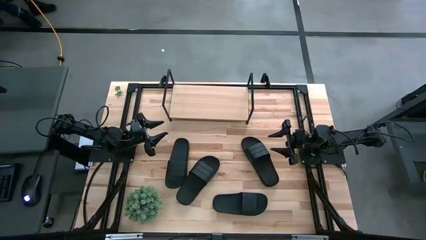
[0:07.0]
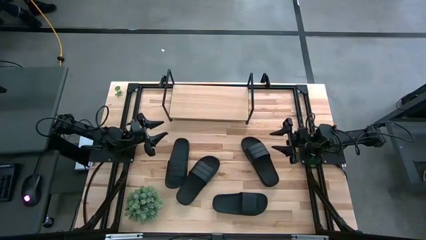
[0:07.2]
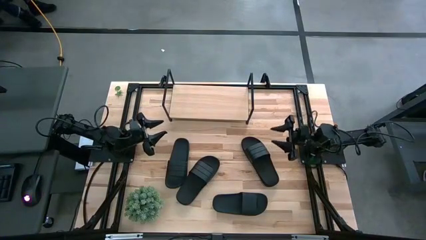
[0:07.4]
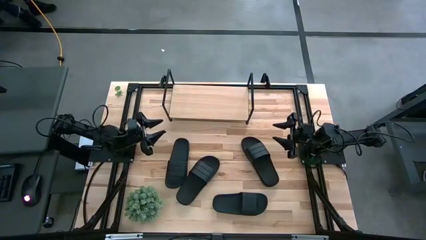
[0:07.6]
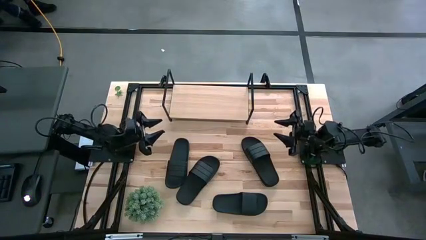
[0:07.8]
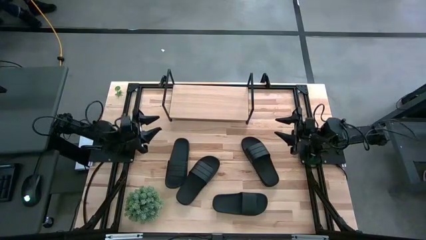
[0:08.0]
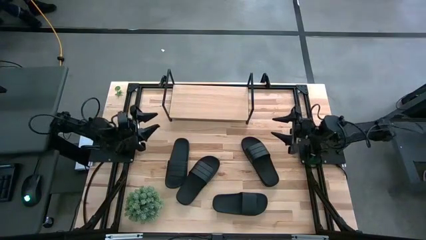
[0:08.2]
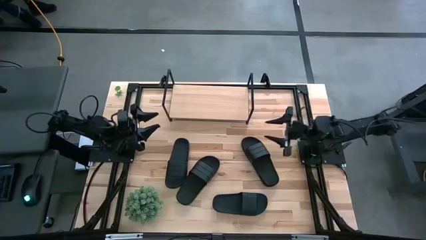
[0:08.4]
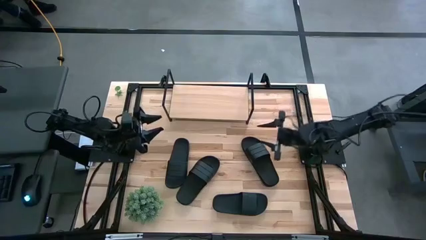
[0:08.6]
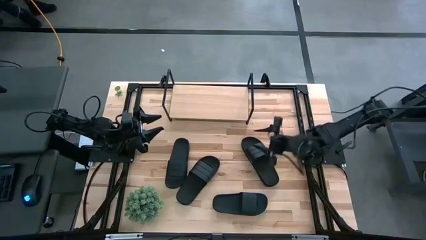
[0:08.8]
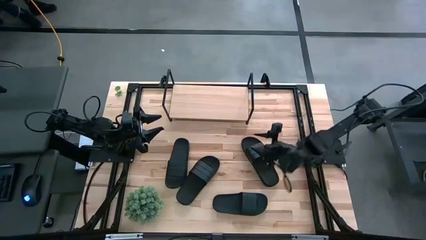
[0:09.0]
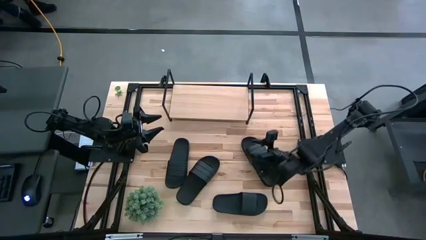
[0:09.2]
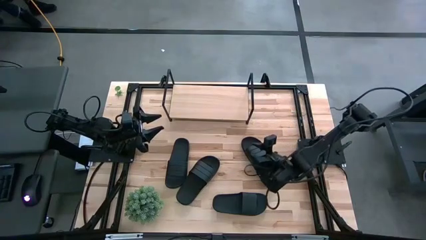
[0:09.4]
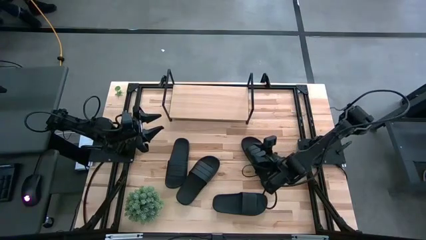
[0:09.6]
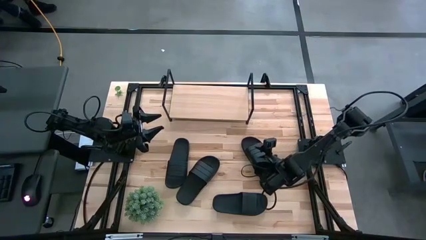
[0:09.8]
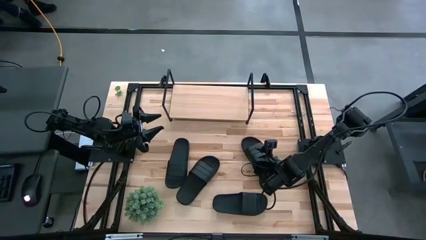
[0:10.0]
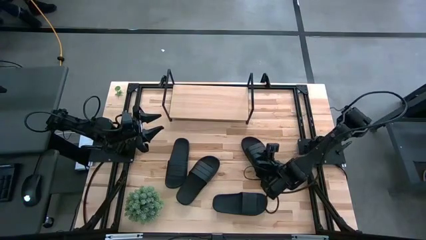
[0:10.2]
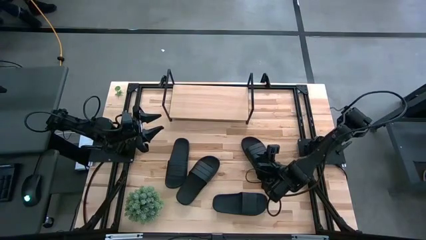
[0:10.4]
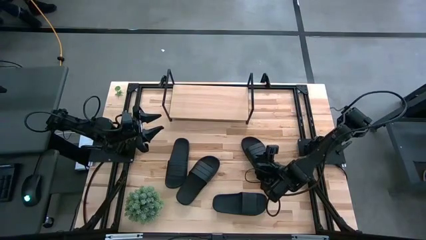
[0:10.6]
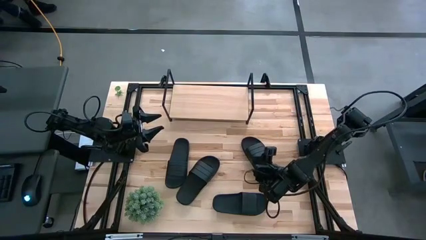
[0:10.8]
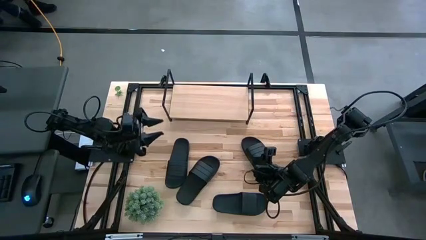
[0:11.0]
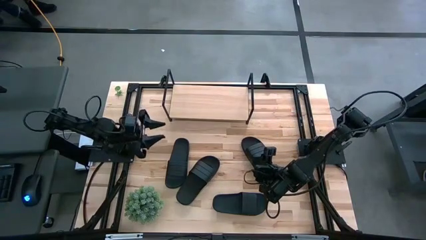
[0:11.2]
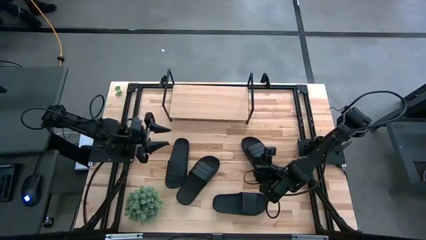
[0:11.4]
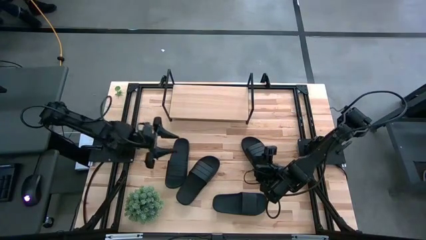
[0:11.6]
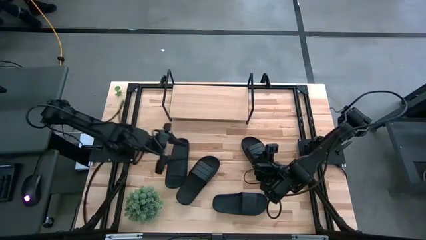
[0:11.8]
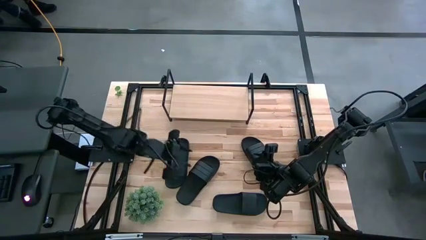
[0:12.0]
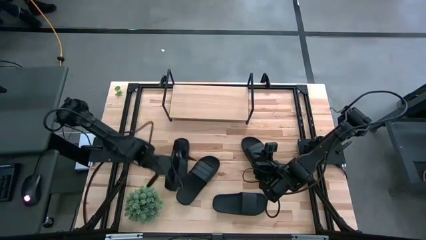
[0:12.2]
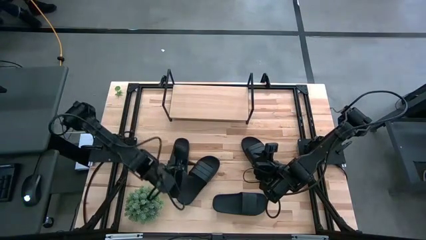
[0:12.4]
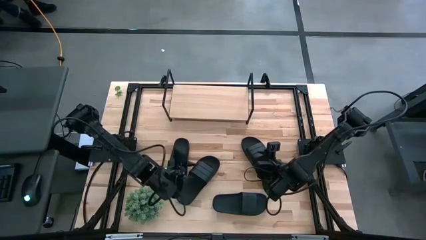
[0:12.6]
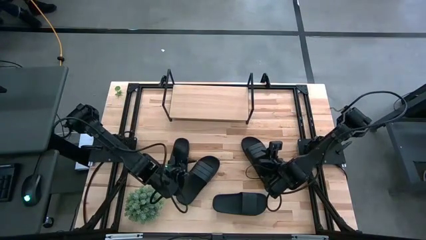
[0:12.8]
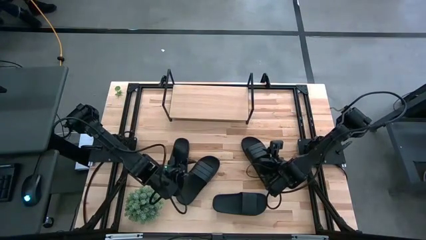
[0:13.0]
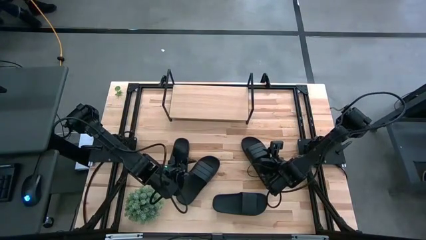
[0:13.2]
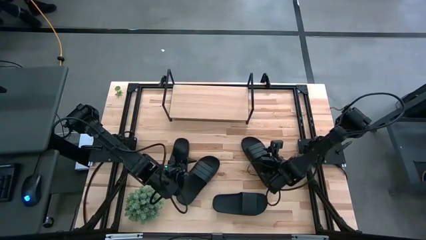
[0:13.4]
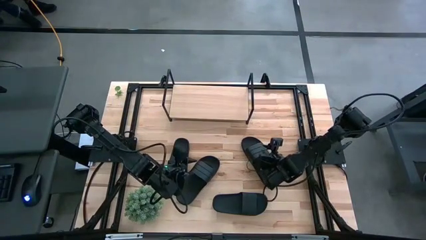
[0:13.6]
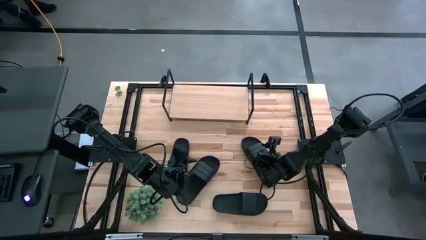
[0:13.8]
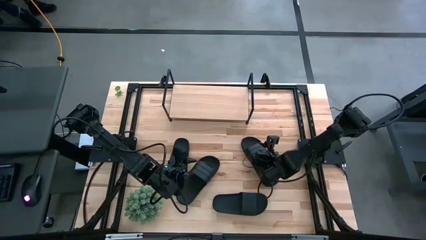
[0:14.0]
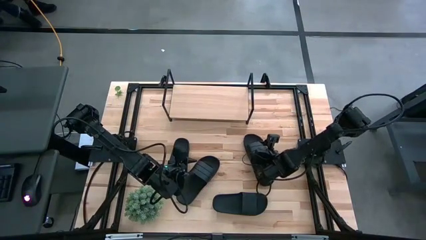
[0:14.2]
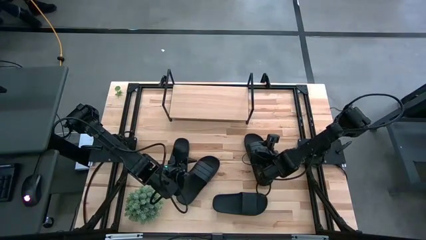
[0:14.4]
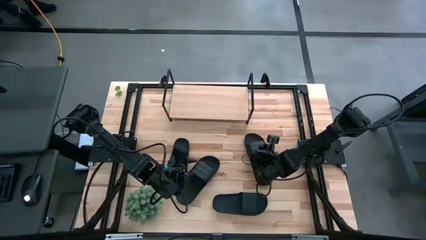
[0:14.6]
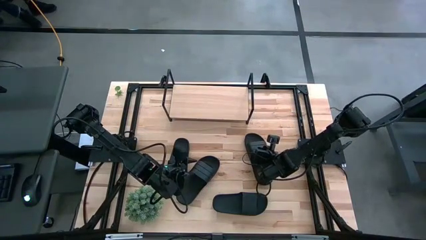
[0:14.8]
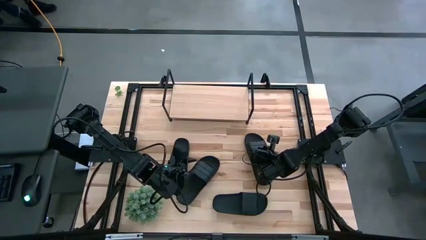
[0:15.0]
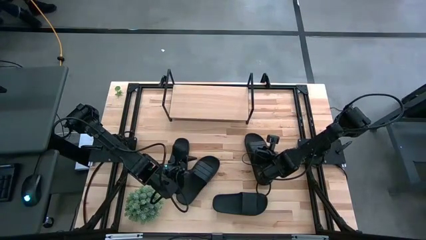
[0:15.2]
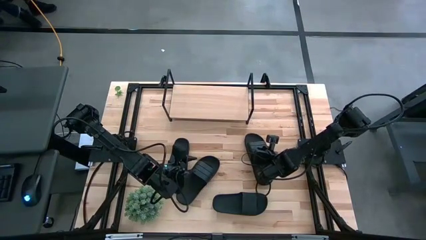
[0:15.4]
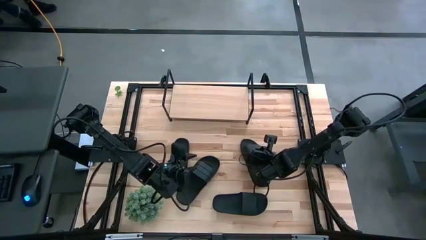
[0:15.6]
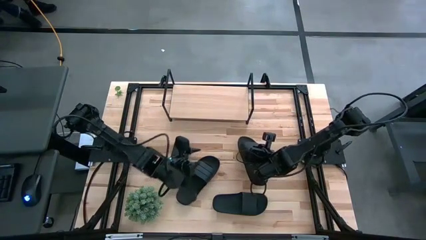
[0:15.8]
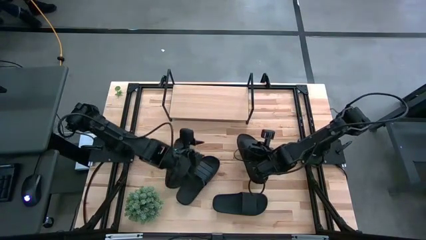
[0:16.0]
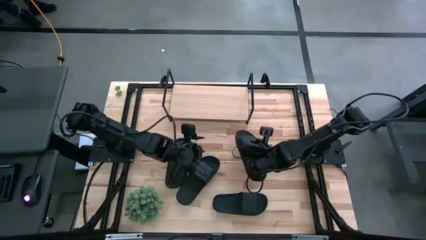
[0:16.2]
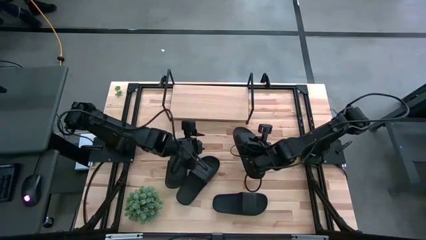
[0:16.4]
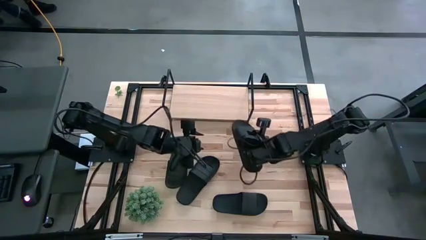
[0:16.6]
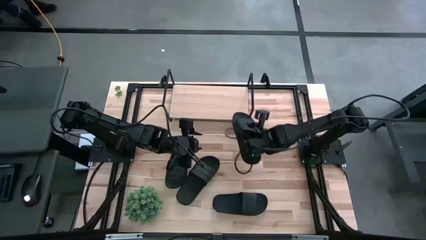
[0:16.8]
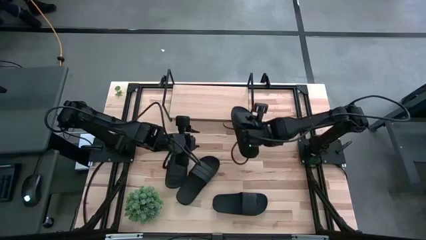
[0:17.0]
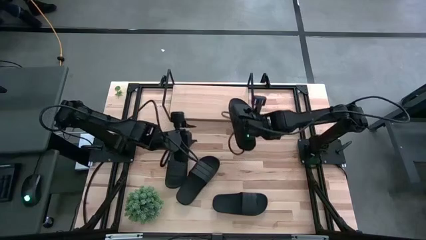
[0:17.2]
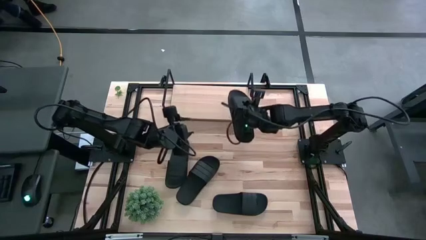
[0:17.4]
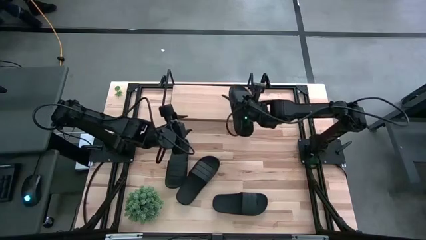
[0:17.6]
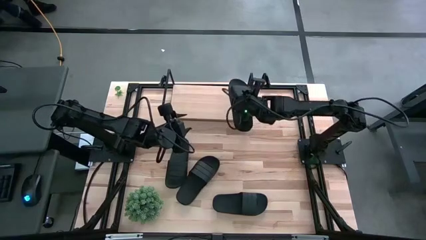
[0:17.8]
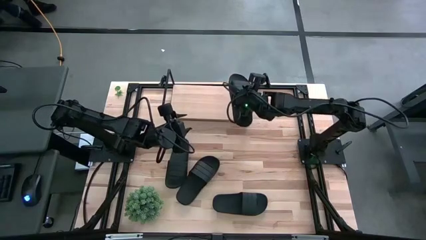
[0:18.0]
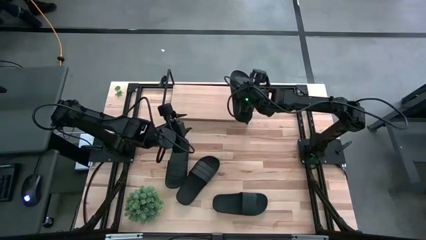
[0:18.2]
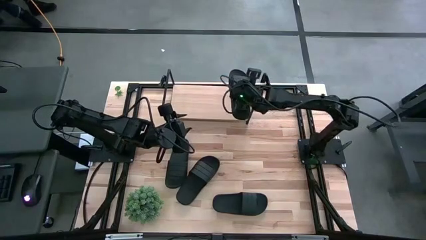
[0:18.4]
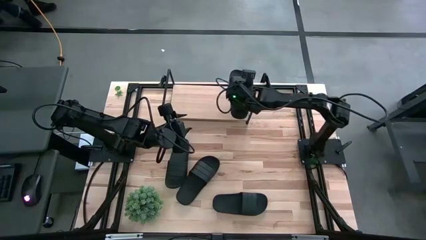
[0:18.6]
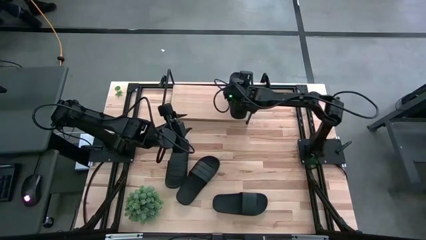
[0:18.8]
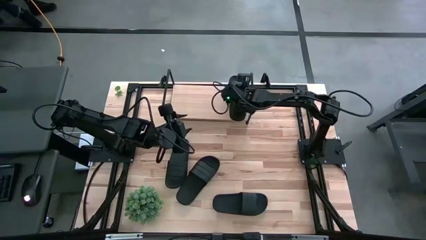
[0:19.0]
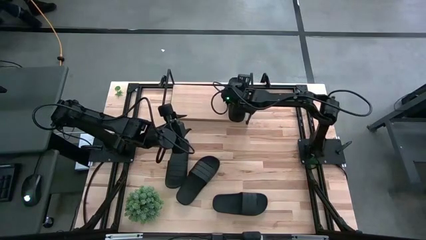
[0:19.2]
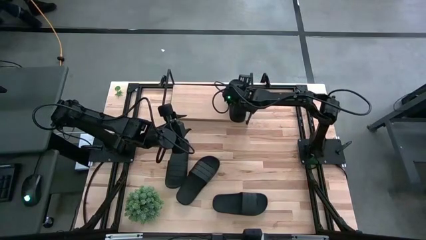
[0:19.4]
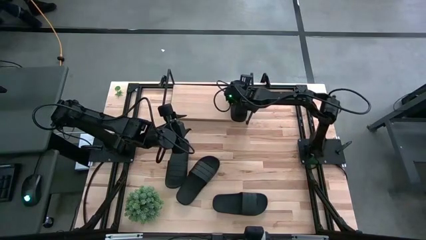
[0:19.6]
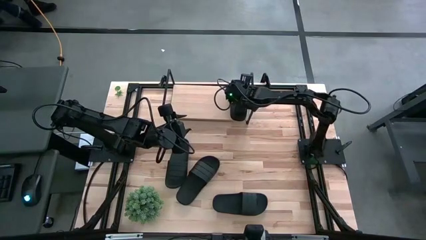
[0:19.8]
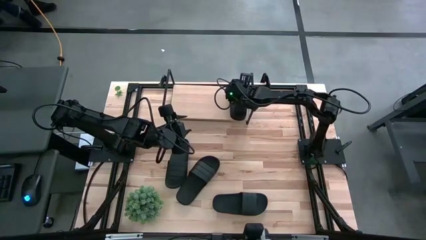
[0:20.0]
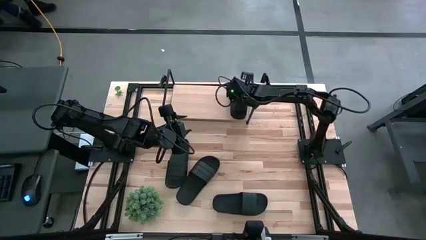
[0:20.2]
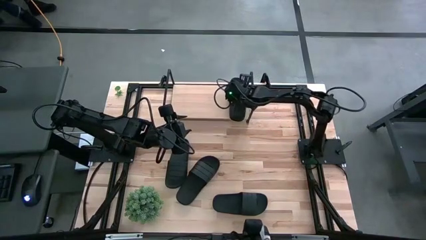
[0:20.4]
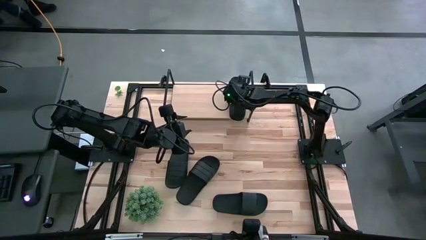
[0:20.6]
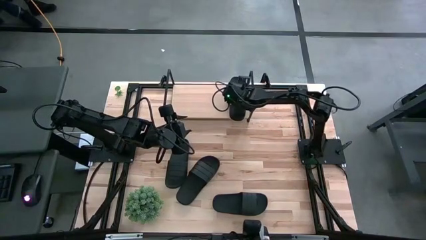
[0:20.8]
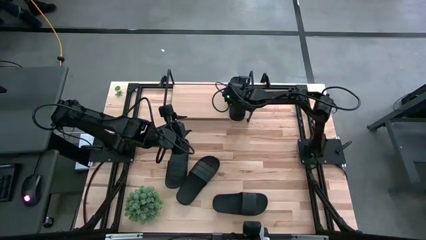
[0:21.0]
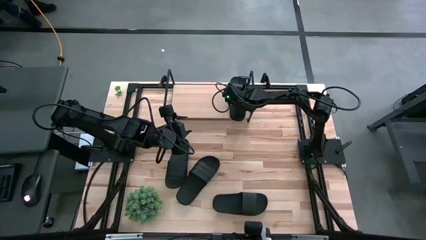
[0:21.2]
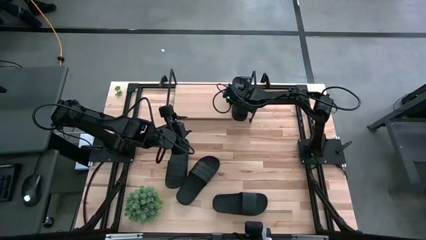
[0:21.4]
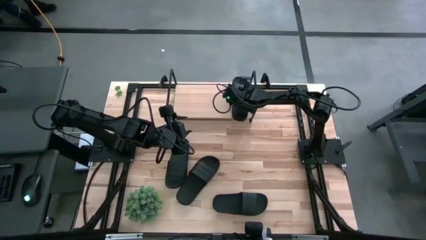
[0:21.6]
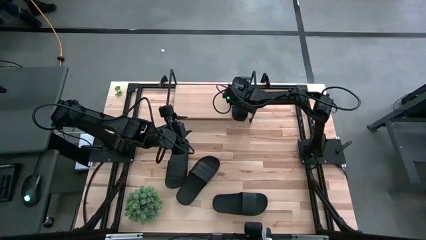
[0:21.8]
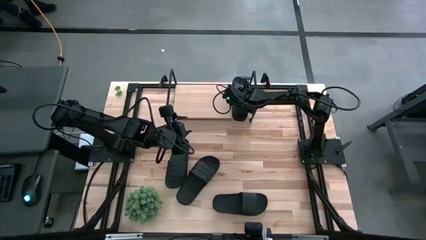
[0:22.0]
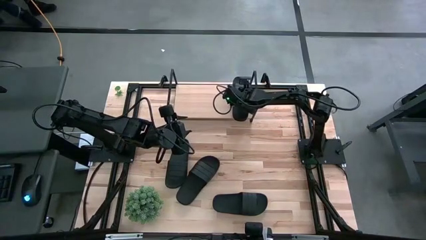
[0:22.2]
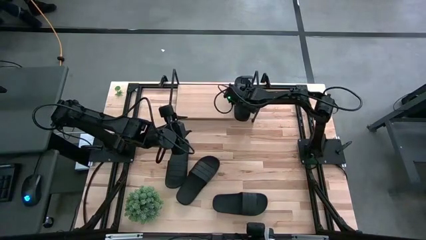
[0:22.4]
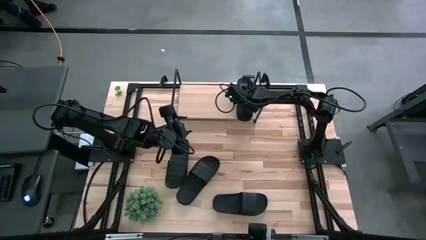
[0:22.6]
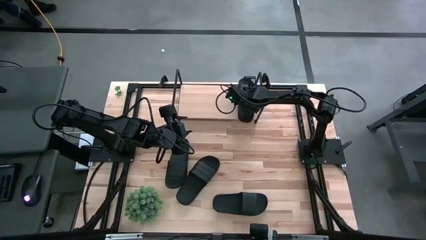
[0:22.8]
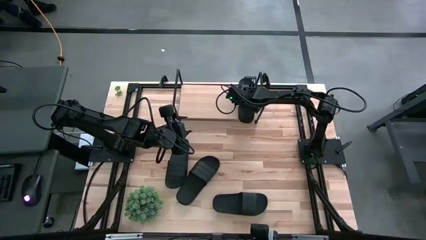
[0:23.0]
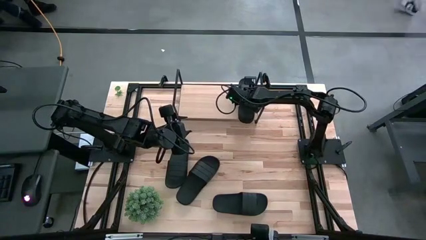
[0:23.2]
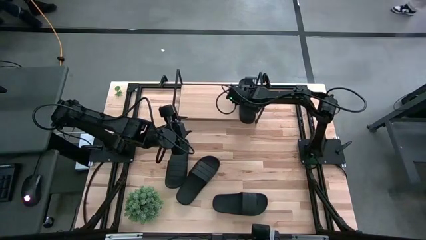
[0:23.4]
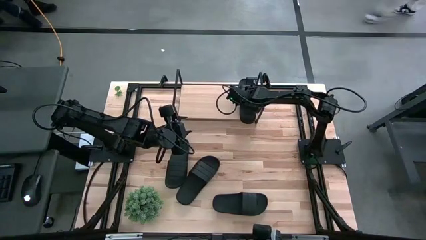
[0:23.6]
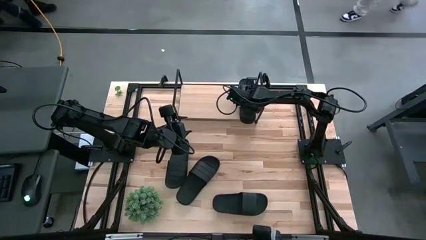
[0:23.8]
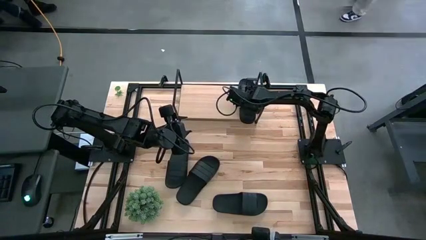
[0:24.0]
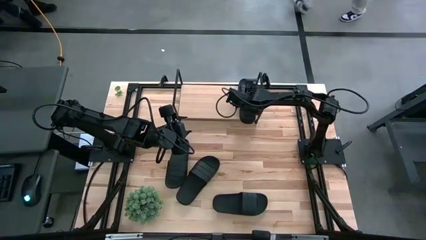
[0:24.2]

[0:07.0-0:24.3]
Task: Pick and place slides into the shelf
Put the top right black slipper on the shelf
